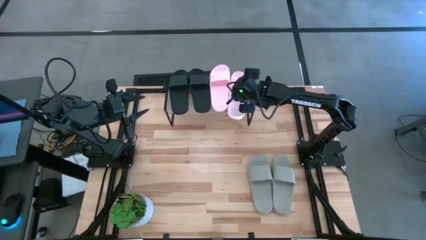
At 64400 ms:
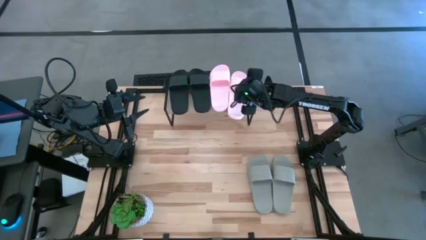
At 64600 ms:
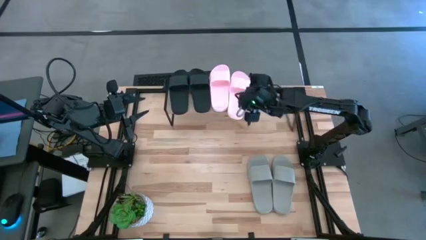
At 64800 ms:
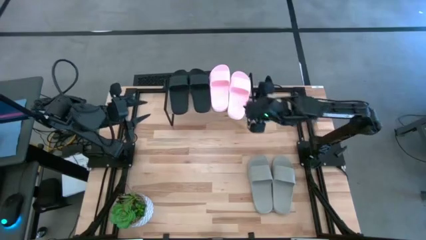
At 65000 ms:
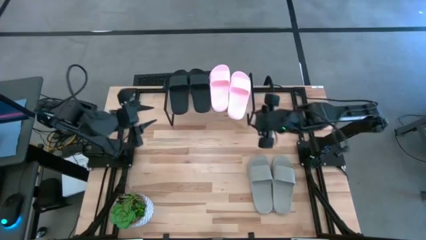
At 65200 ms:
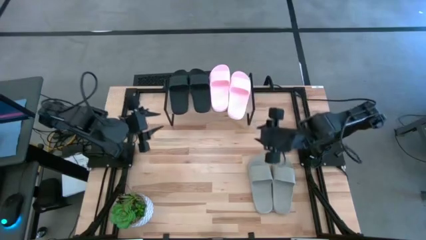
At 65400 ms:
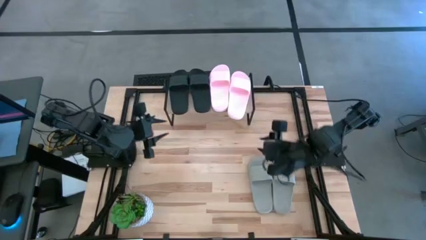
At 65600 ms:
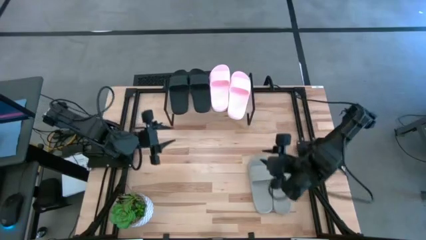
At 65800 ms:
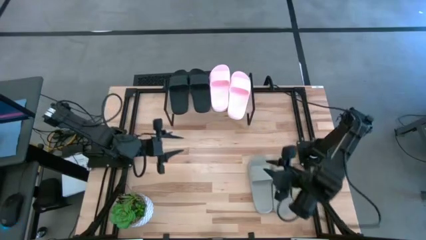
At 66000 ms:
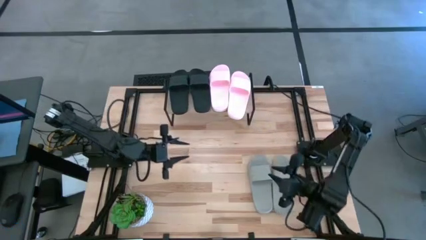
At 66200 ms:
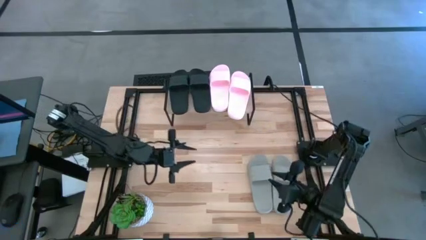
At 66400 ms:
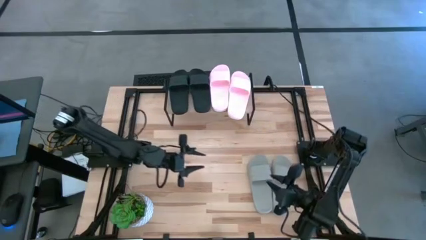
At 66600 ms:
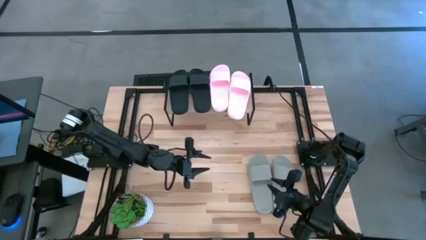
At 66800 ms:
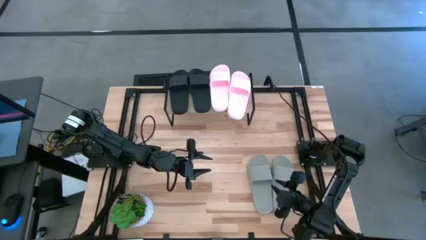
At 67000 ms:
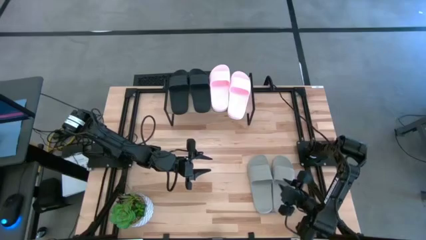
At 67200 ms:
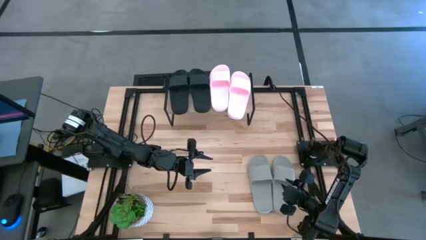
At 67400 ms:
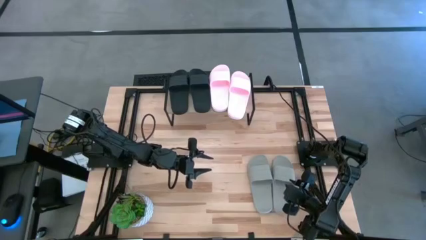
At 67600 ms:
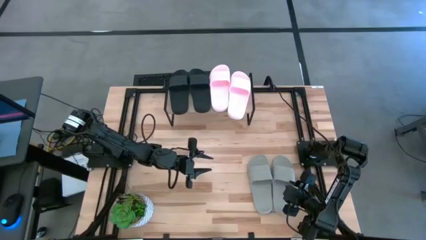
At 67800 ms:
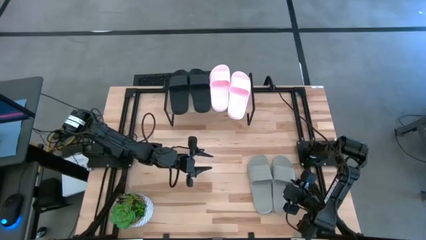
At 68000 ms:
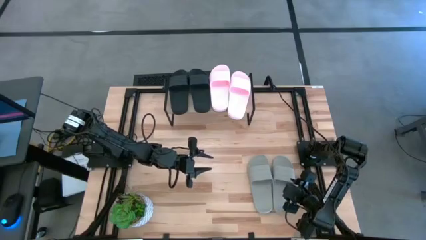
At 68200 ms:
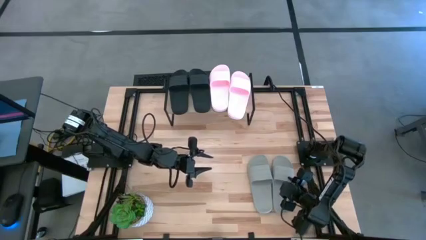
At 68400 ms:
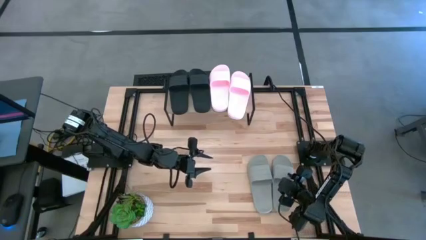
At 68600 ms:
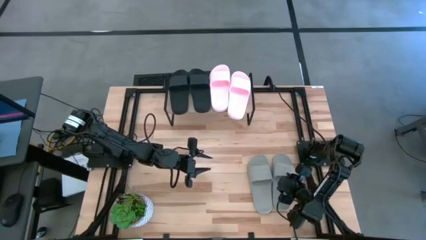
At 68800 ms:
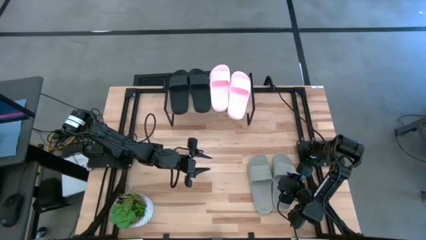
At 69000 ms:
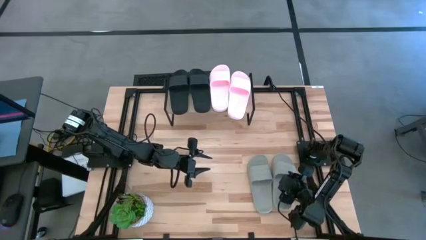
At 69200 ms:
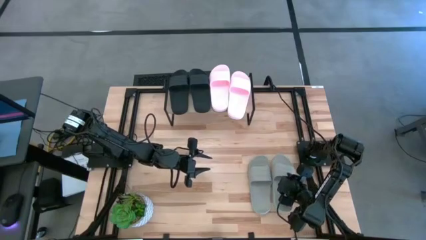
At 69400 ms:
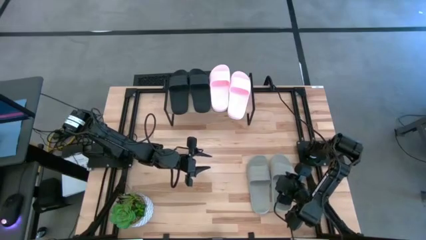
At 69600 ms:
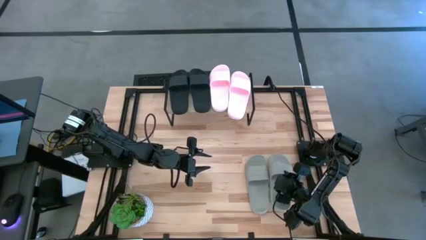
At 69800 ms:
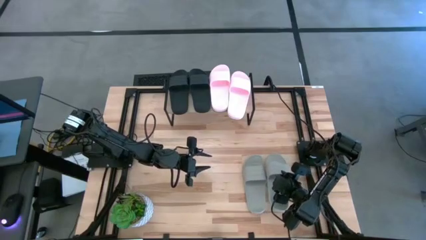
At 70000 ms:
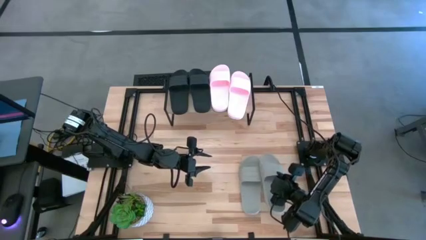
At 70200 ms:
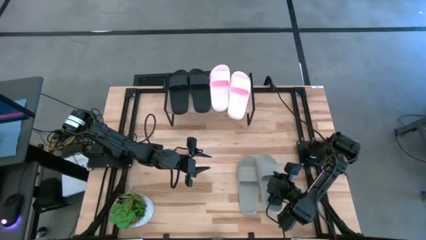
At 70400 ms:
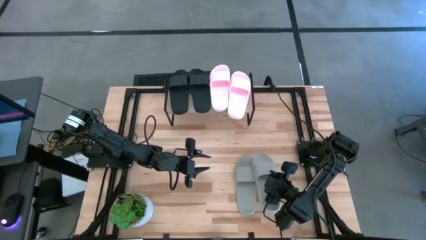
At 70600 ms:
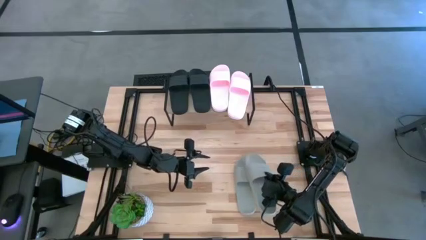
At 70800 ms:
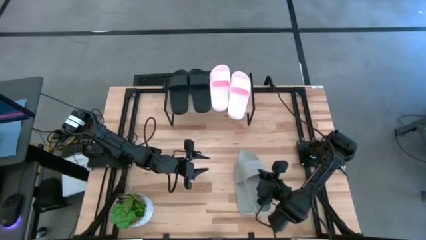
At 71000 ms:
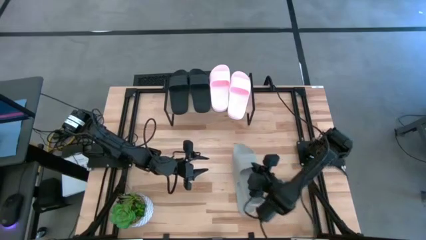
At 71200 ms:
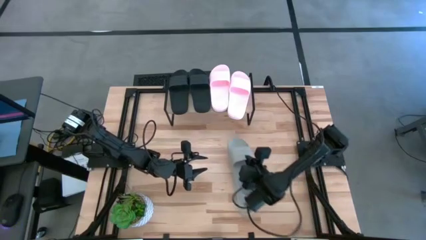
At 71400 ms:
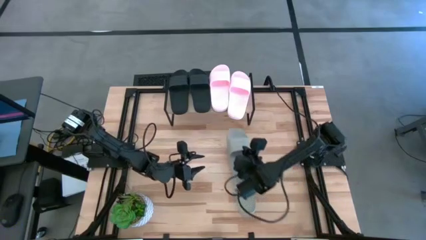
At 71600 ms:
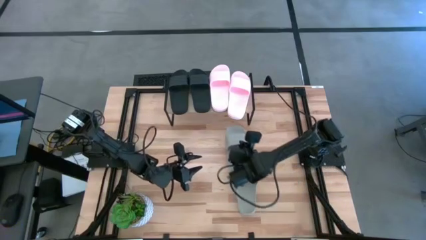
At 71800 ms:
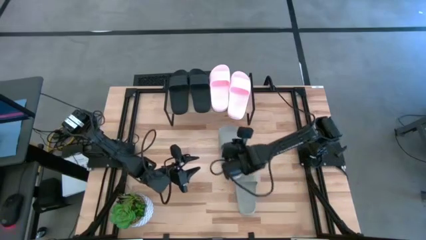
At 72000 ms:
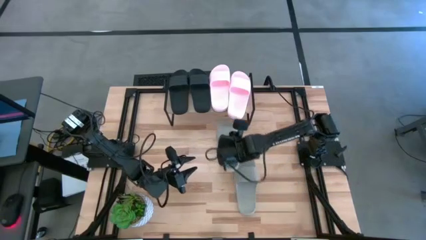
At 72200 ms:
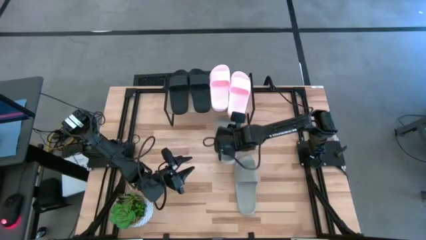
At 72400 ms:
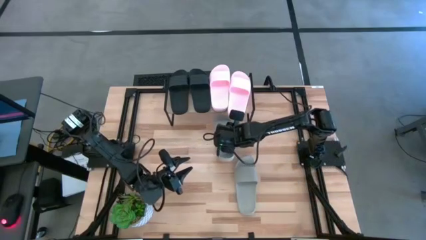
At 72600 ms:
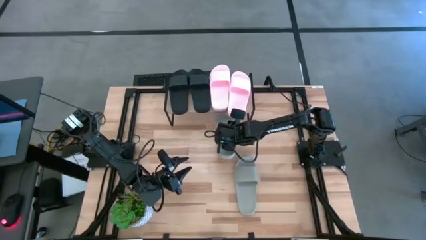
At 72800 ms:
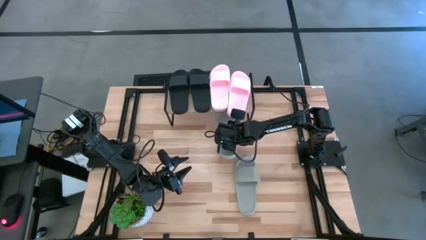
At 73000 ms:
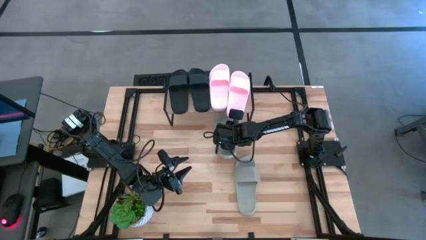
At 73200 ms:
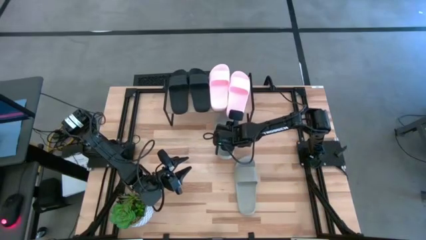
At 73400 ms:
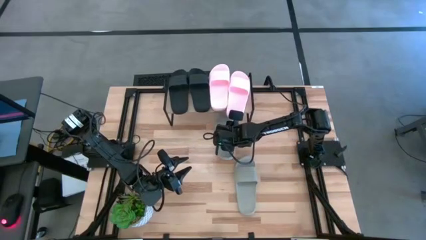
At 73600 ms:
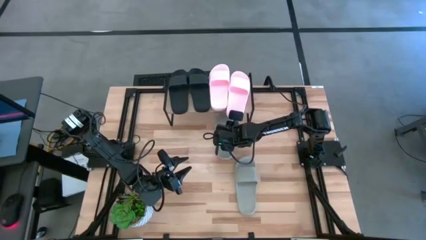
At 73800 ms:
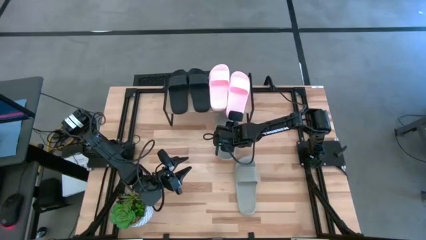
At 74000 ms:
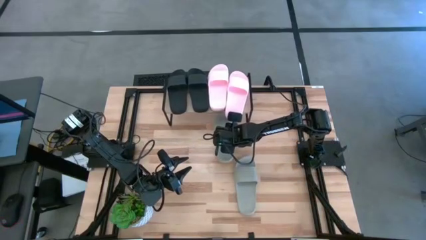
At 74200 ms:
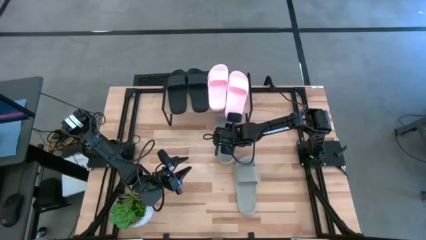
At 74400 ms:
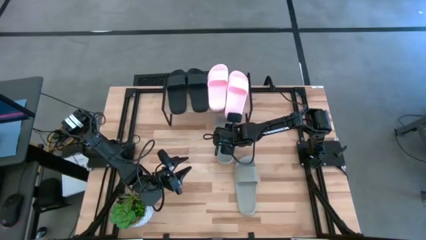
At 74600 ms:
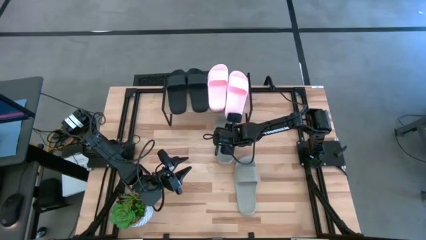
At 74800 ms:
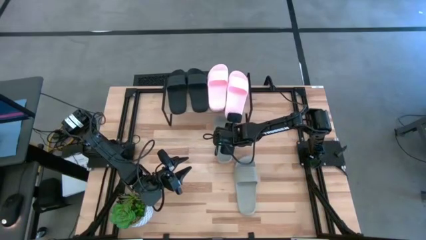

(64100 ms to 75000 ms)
Task: Pick and place slides into the shelf
Put the right gray slide under the shelf

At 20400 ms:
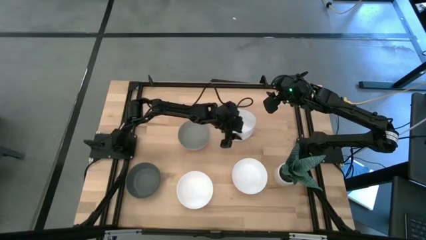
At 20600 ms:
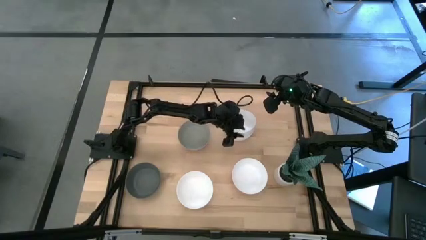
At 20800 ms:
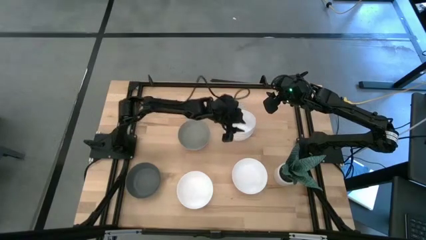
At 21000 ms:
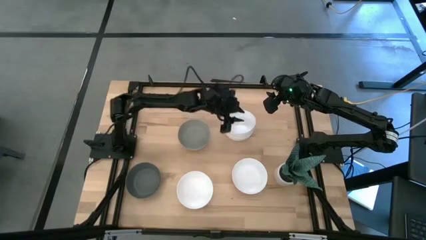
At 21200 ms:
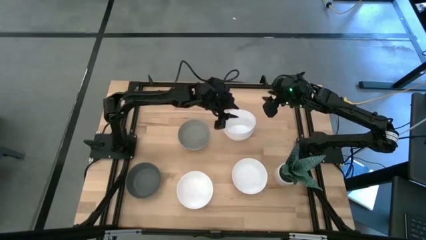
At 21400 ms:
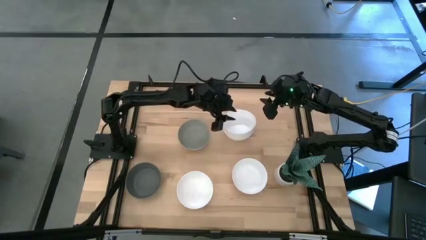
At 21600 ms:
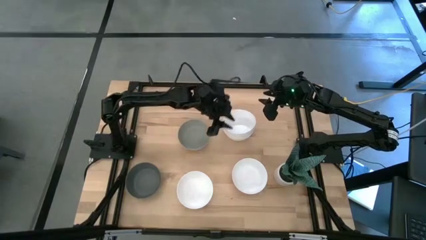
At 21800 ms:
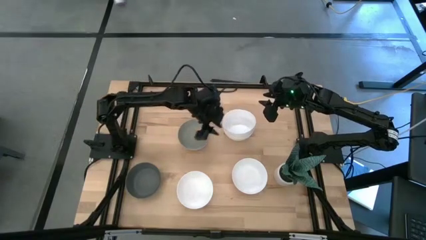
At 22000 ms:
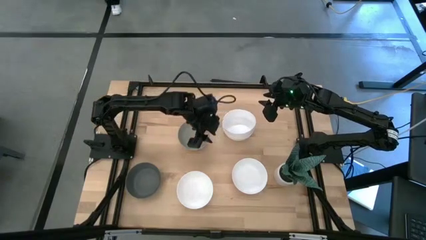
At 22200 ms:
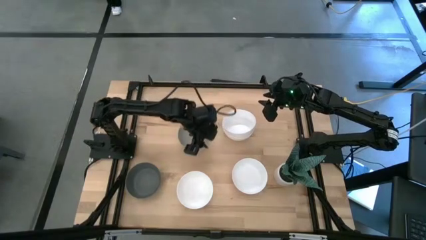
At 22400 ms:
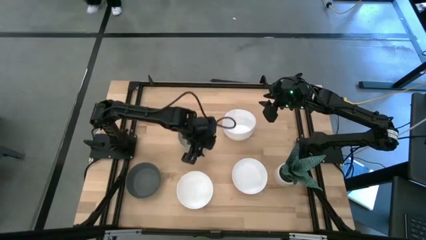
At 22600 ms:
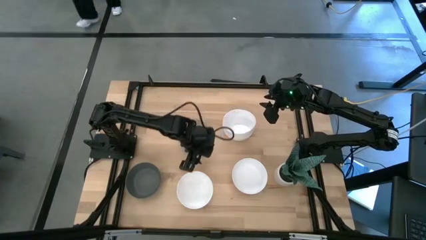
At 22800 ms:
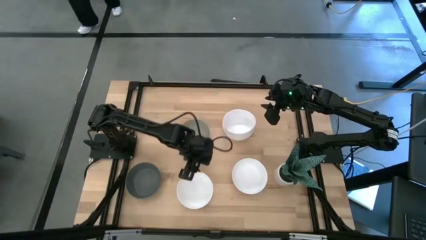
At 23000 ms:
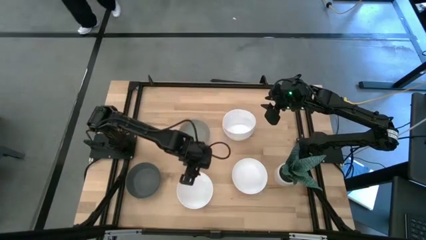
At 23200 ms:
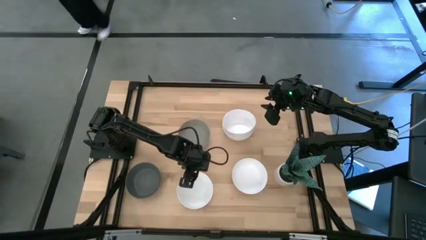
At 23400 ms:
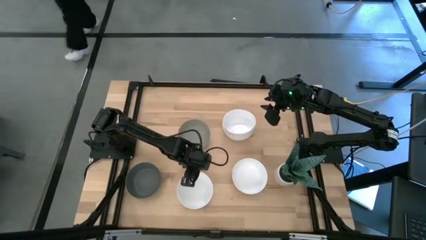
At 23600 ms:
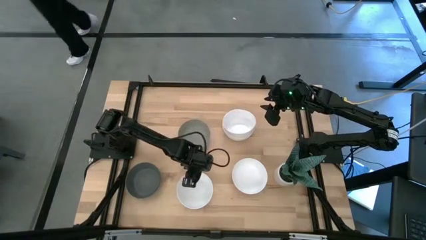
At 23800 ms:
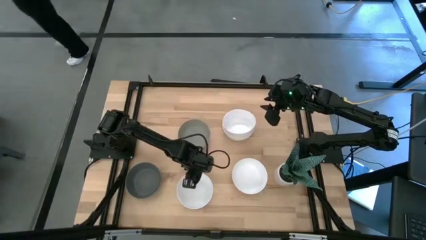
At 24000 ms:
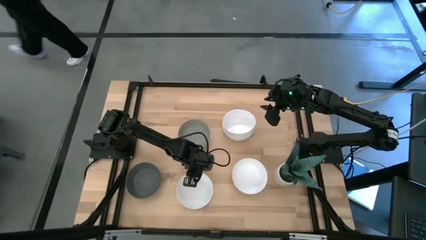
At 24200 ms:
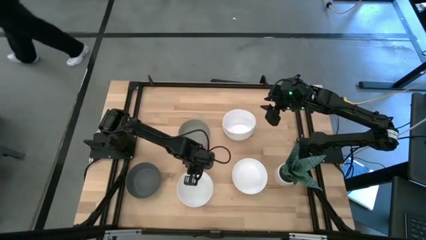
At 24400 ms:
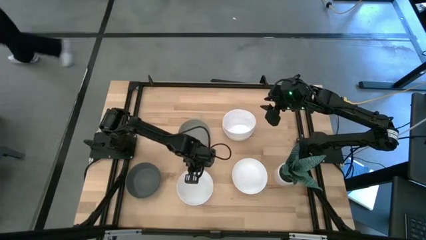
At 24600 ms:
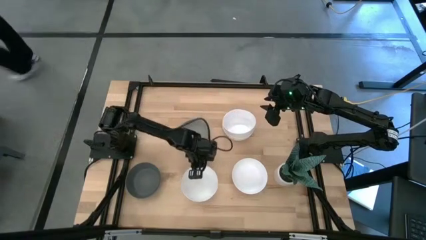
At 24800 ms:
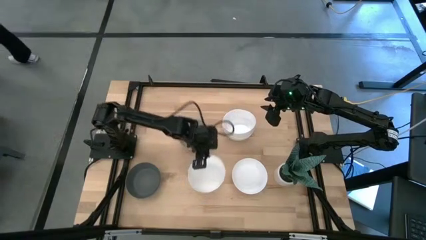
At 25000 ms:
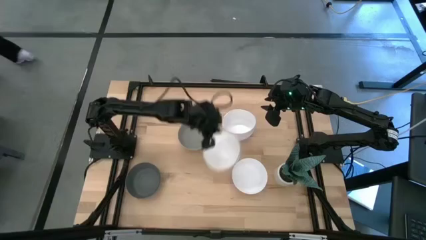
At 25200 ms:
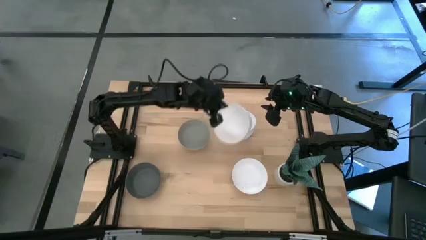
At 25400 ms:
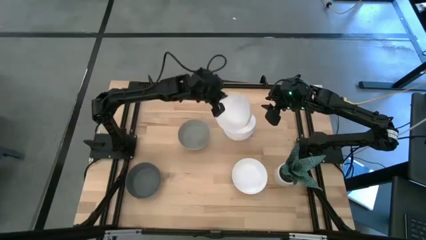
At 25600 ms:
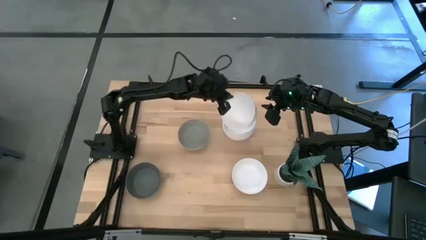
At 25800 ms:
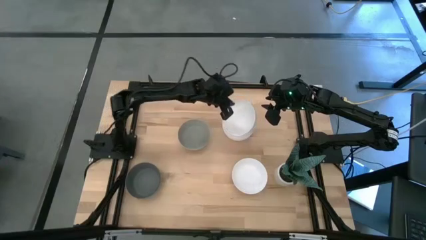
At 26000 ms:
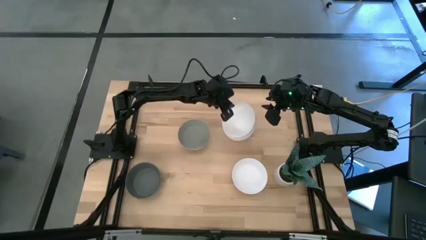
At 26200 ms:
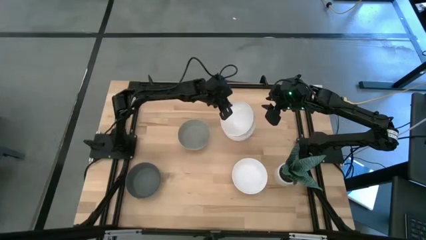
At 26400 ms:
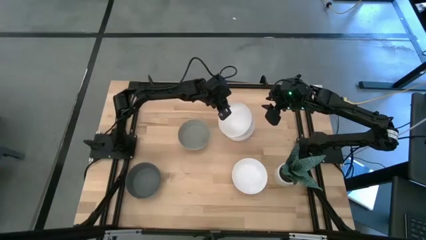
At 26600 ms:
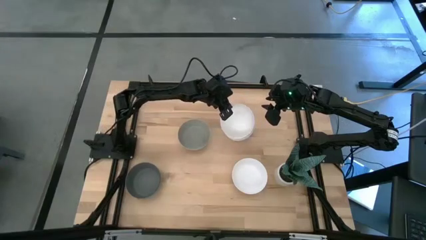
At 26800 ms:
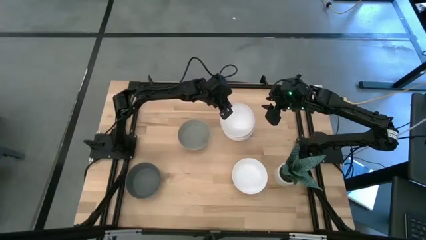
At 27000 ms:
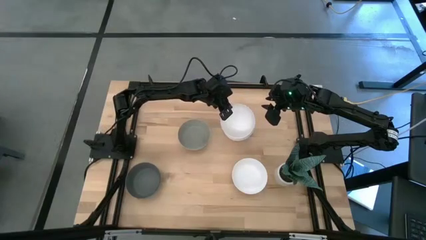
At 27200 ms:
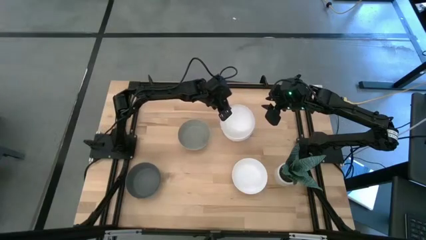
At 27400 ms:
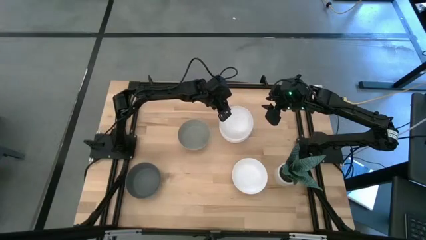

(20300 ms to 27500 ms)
Task: Nest bowls inside each other
Stack the white bowl on top of the white bowl
